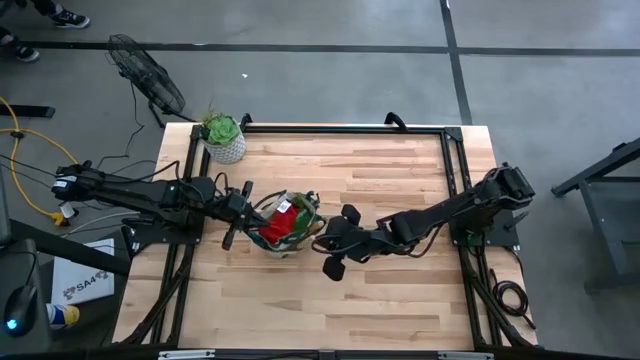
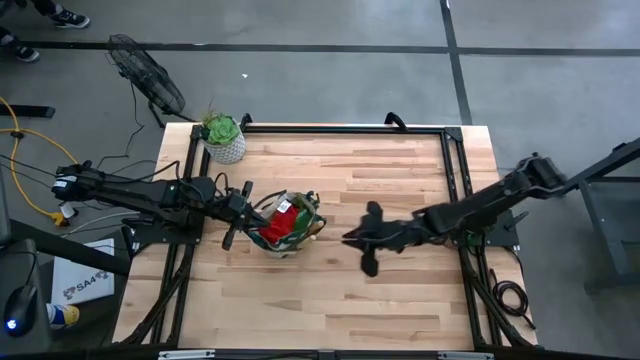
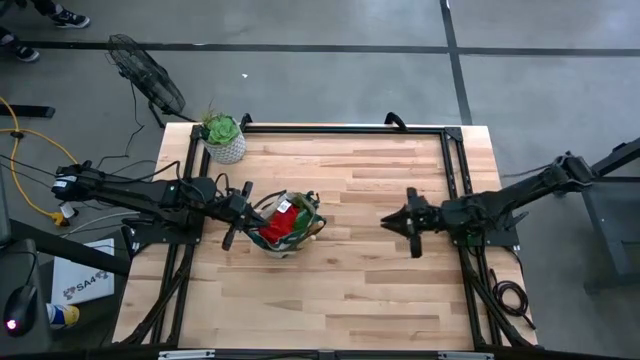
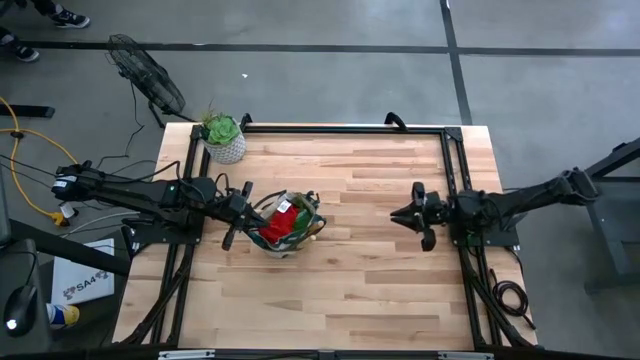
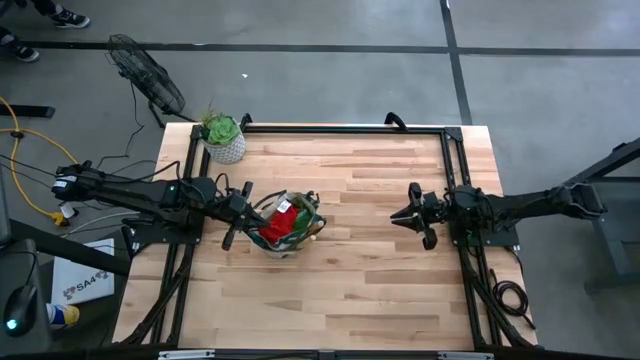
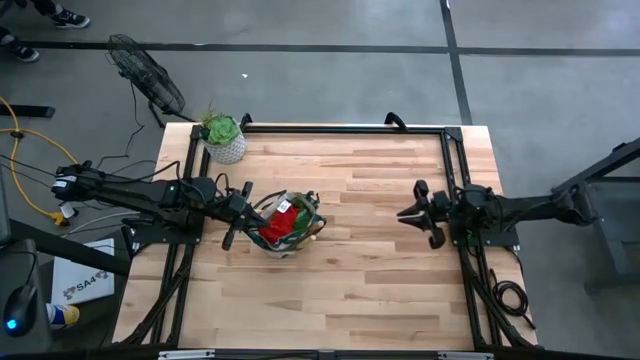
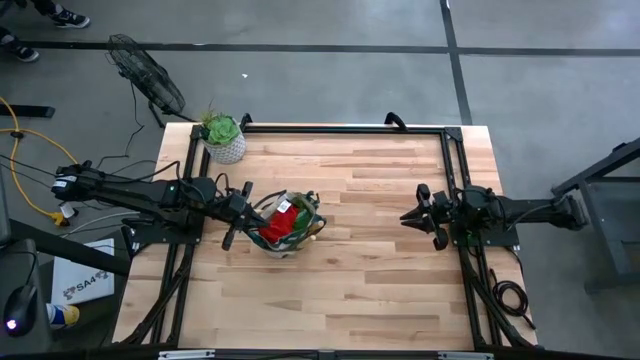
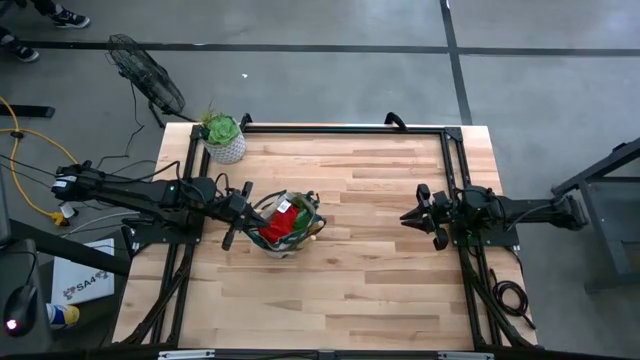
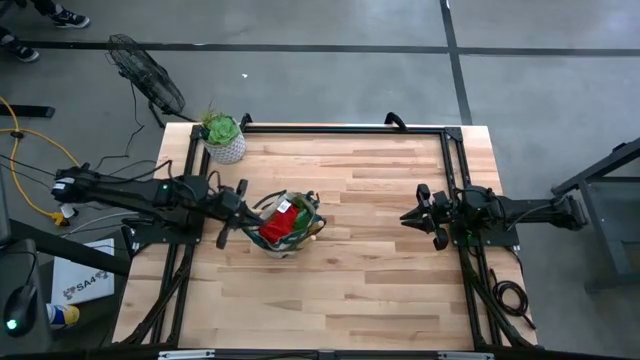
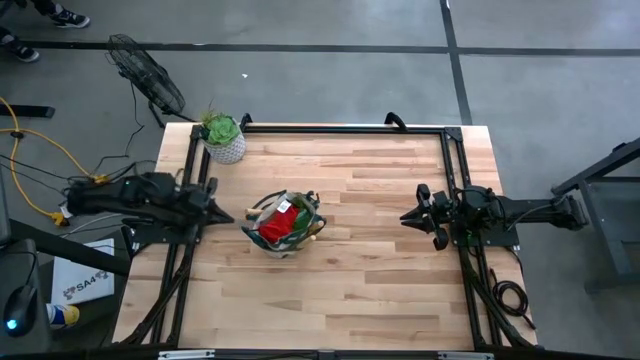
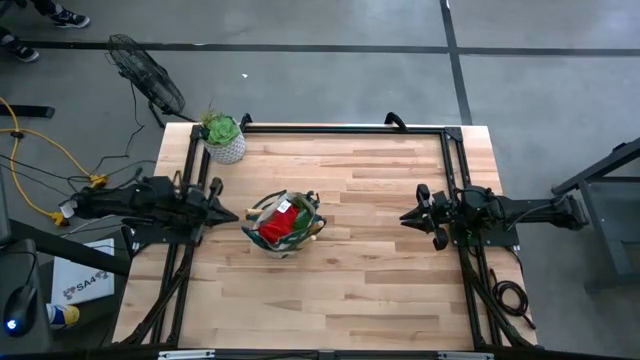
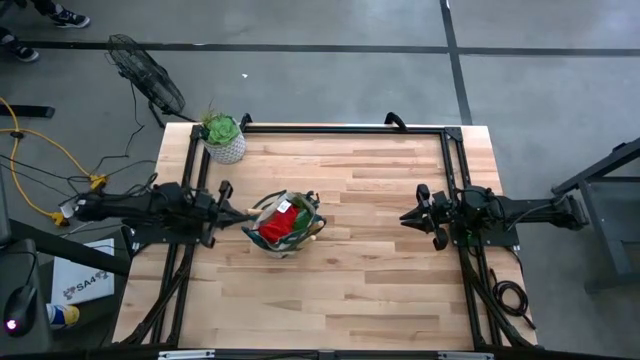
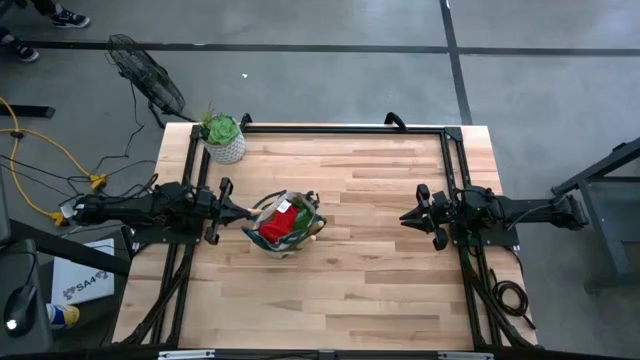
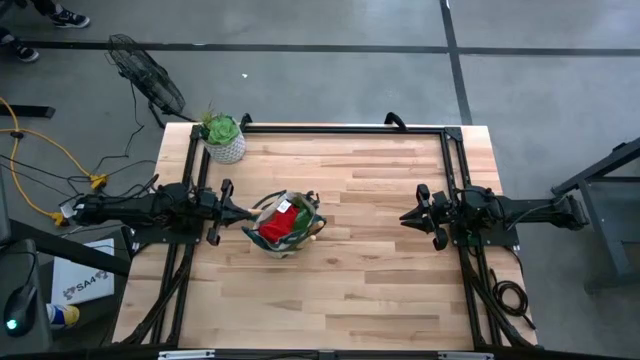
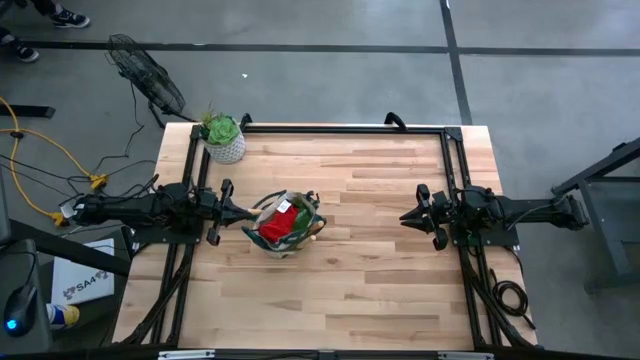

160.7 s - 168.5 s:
Task: Pick & Place Garden tools in Gardening bag
Return to Home Position
